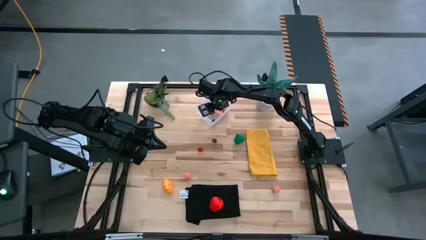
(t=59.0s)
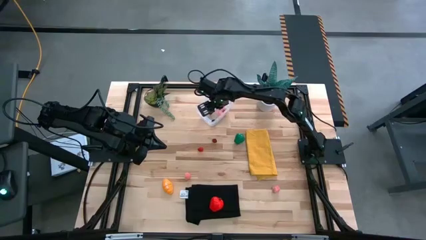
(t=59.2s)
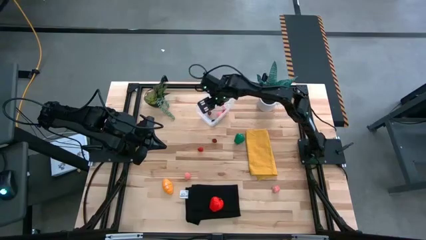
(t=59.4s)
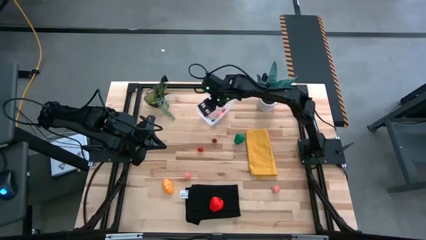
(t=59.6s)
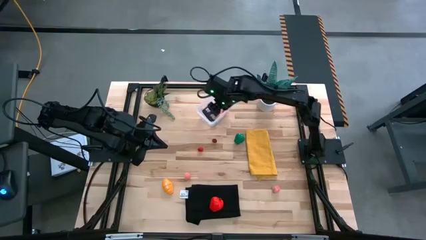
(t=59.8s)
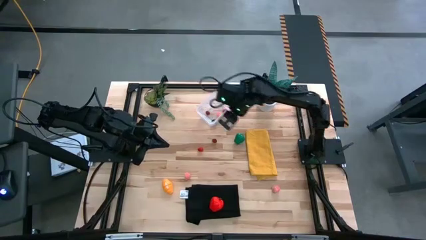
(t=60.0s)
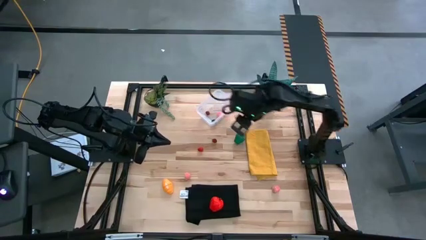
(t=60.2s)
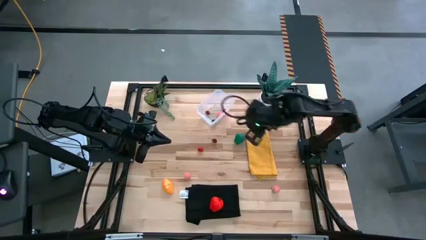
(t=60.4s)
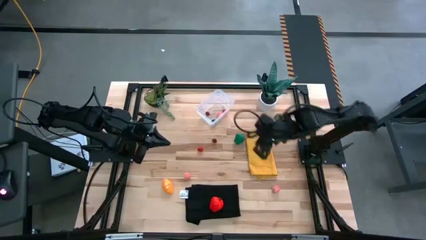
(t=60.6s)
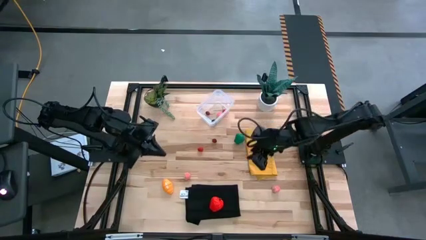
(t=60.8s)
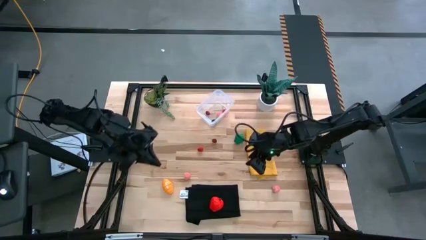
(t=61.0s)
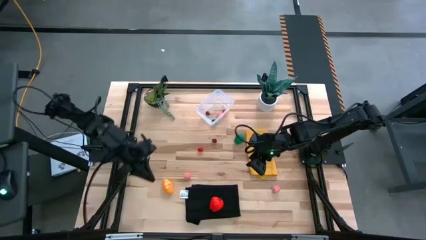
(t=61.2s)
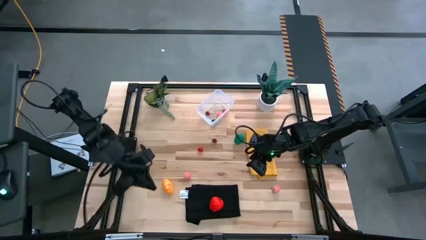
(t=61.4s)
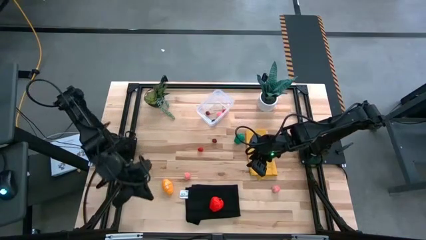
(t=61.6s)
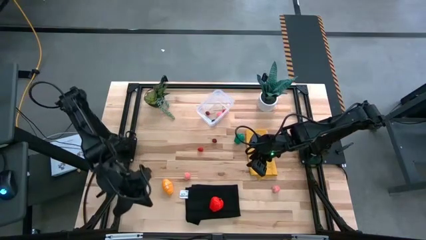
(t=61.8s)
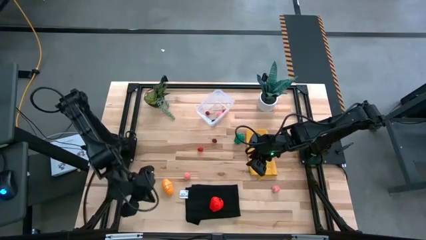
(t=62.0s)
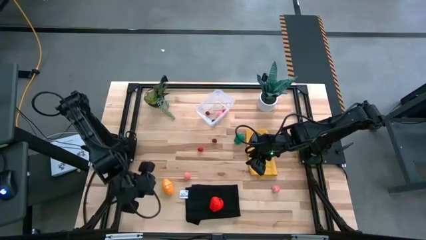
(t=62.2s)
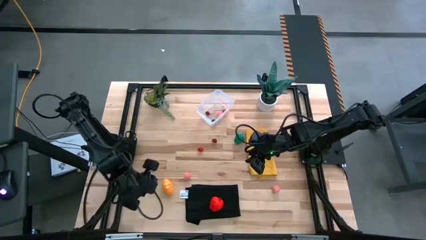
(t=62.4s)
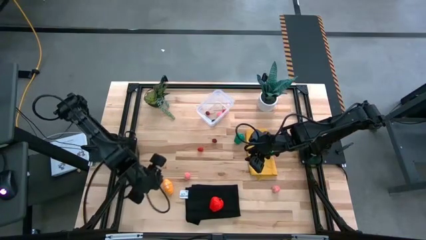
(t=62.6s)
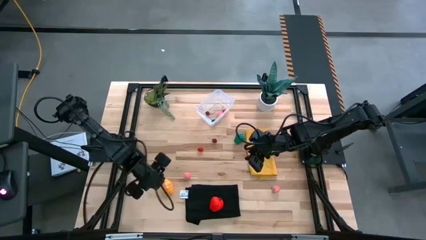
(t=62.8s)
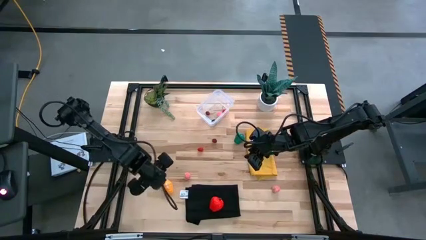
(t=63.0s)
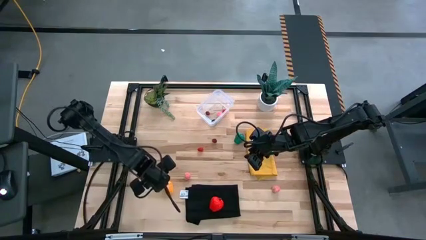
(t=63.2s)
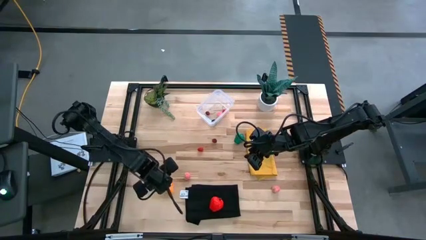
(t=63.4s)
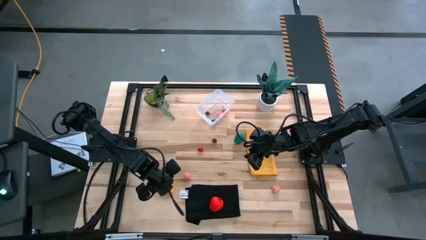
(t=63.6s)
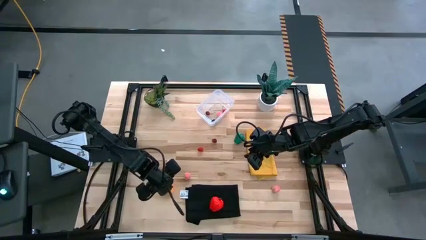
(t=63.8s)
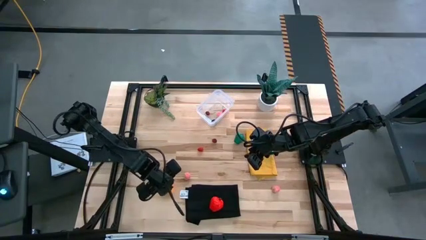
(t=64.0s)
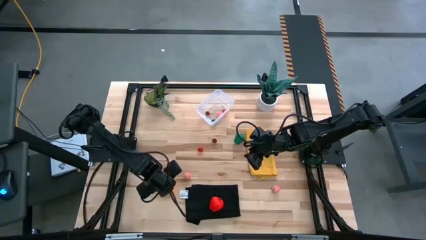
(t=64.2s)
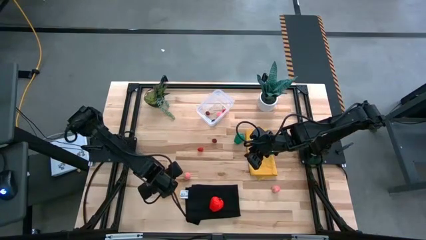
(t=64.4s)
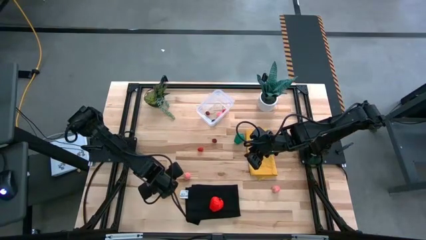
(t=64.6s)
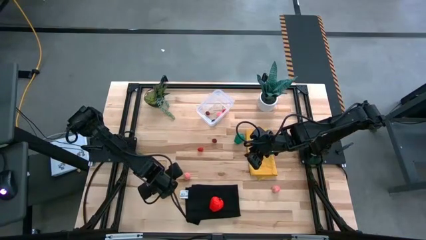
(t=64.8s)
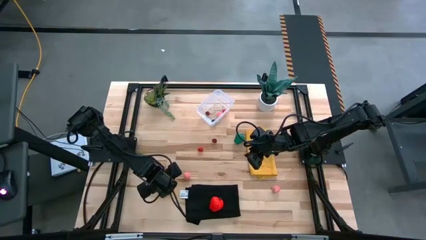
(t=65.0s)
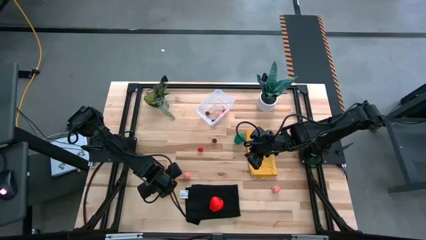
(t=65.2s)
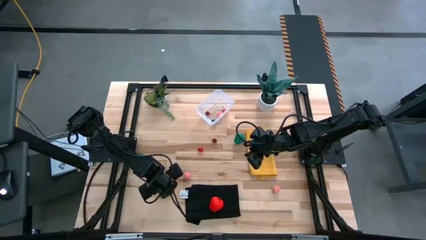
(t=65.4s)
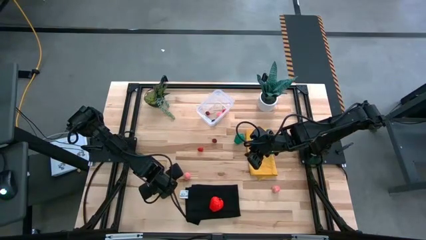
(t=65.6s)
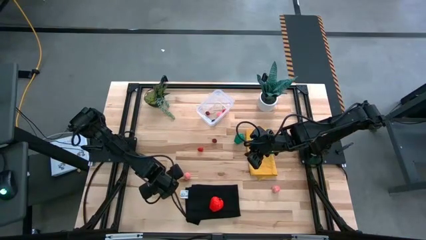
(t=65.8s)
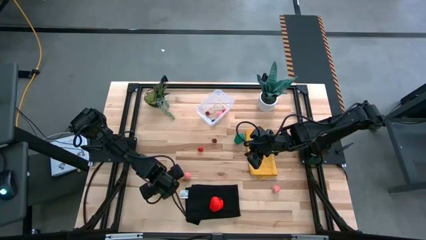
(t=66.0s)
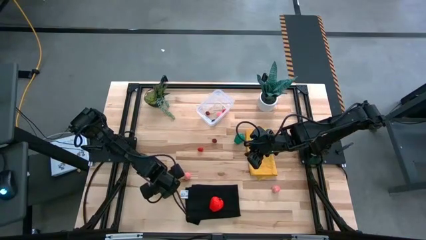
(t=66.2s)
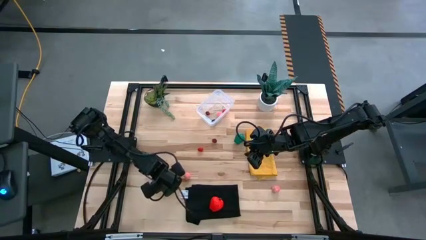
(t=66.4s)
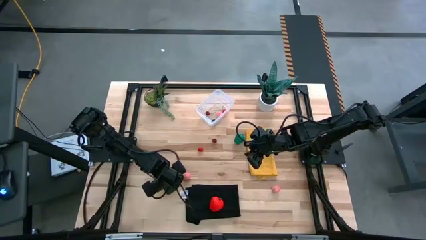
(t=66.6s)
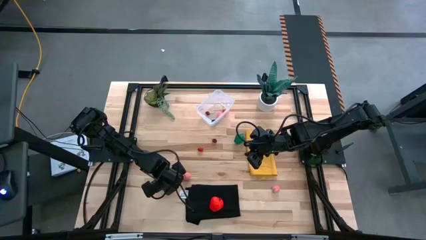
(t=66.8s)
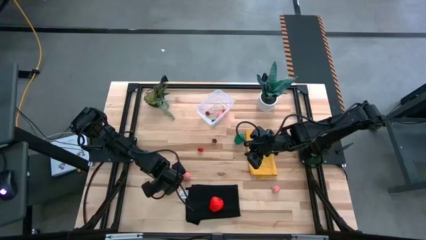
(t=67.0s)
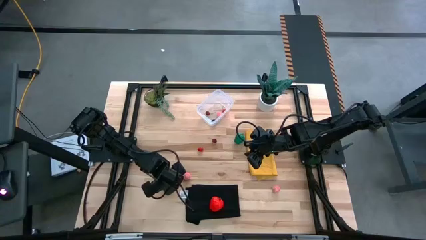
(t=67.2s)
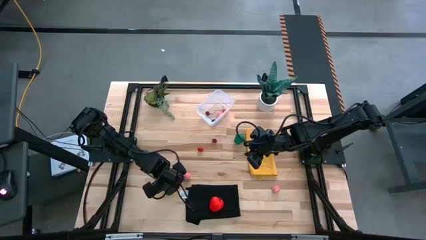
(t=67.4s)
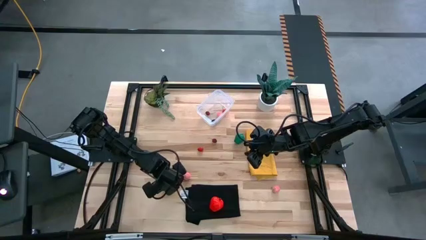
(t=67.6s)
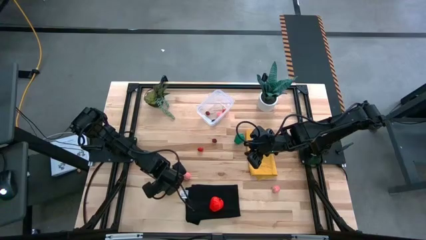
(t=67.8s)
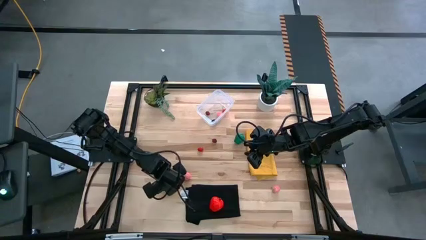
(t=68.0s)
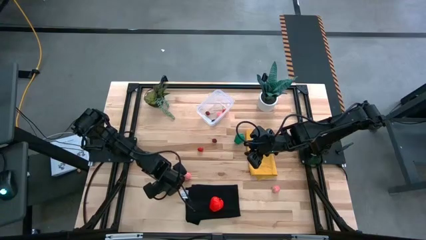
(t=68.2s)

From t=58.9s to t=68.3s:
Task: Pick and placing Produce into tupperware
Put the yellow mango into the transparent bin

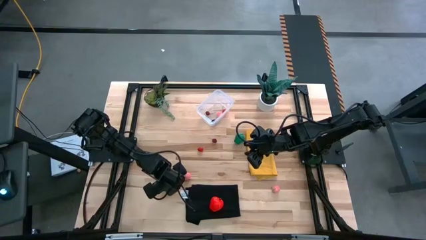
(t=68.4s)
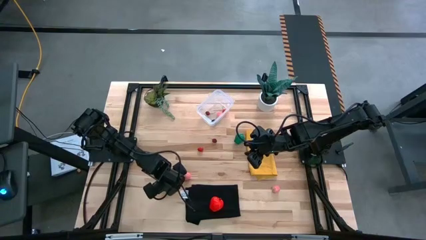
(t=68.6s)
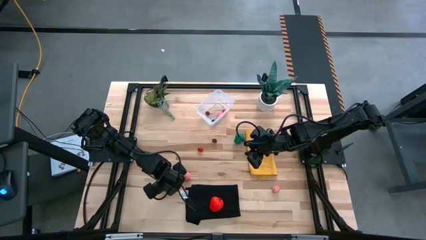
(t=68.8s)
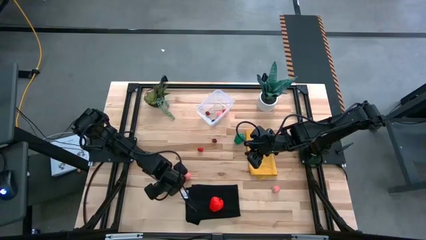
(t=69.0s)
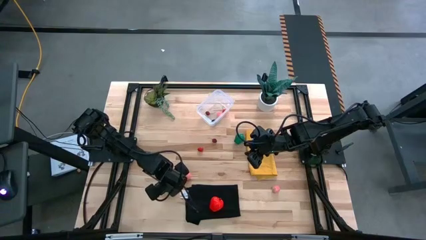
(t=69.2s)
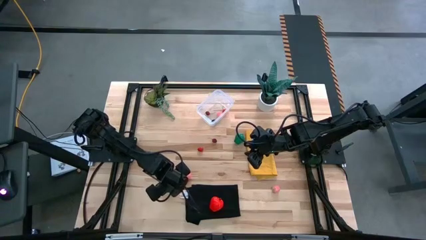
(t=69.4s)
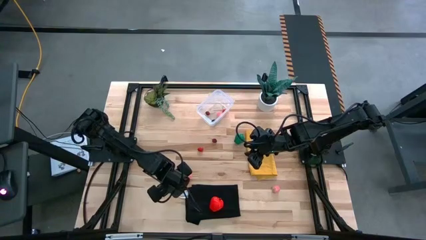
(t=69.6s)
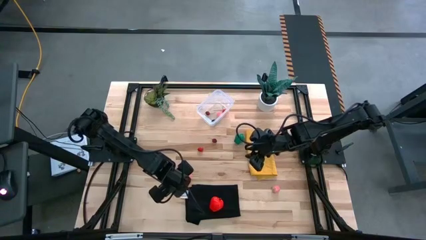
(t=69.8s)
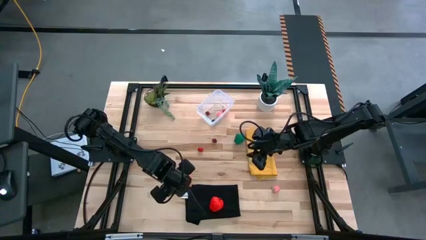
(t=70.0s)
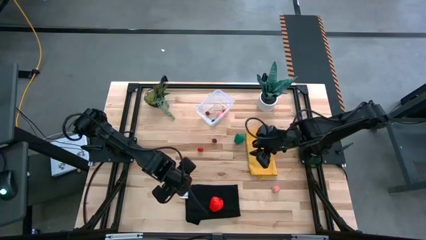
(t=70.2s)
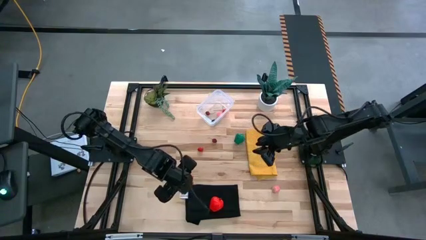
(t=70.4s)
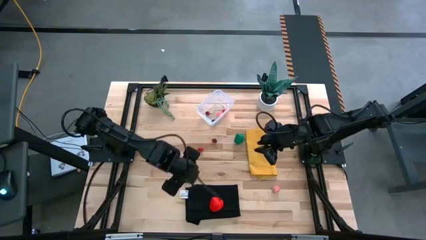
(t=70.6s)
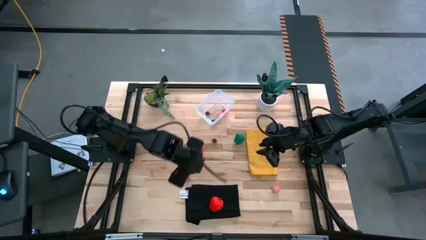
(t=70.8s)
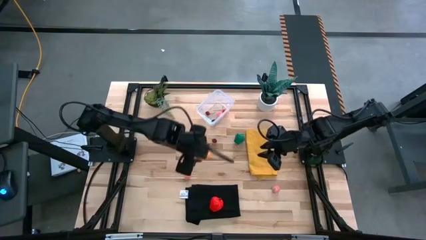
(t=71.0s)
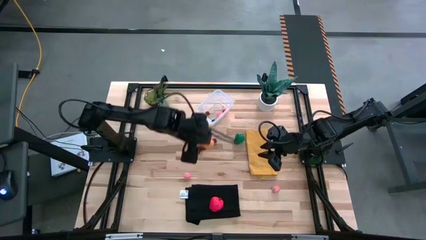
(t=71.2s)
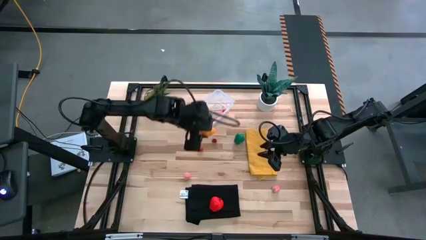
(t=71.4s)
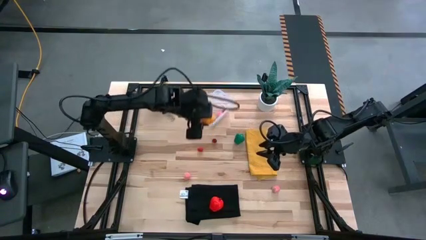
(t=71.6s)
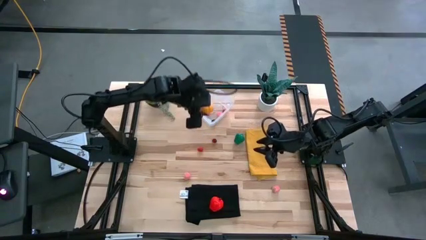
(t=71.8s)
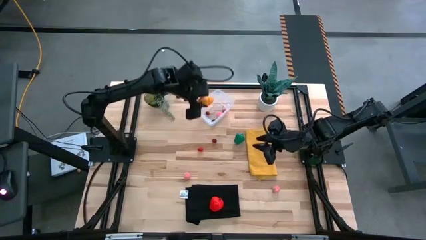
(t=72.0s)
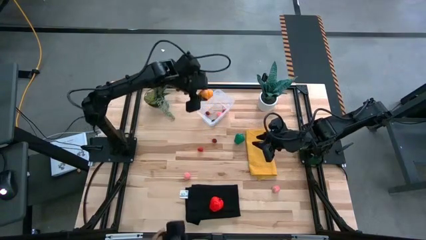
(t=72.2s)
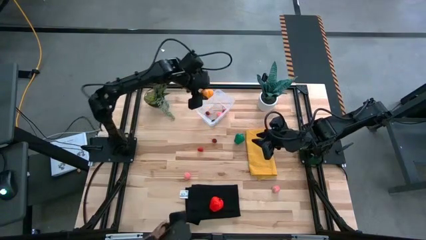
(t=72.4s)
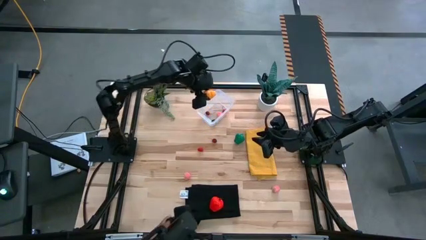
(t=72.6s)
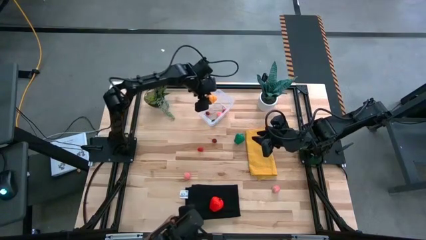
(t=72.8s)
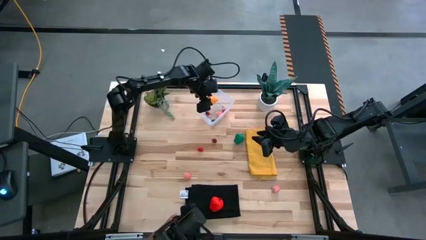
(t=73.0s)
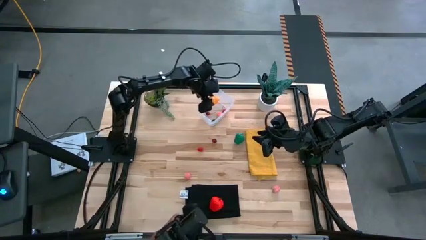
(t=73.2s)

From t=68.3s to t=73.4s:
Put the yellow mango into the transparent bin
